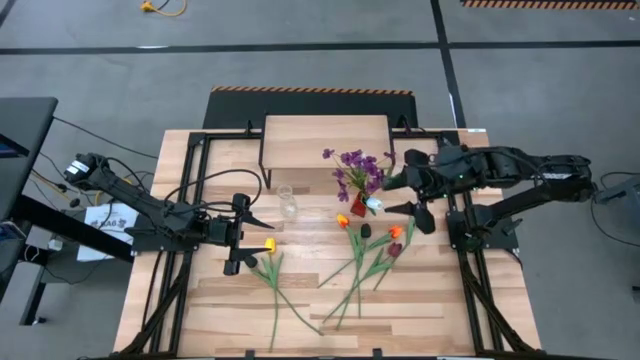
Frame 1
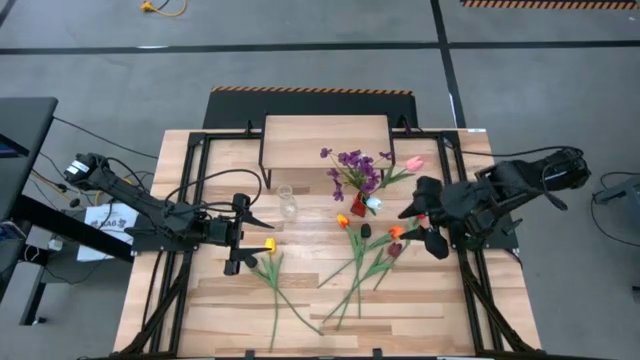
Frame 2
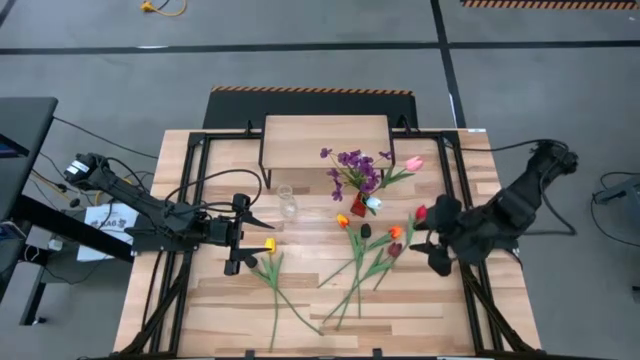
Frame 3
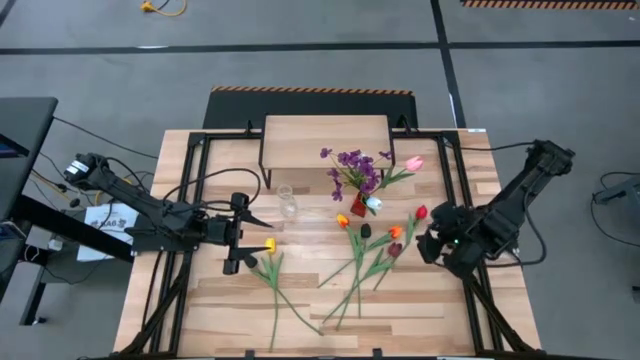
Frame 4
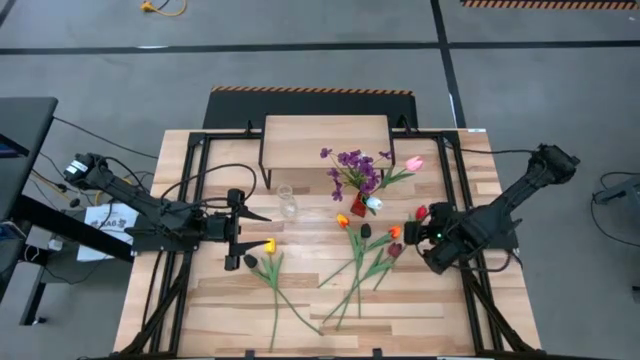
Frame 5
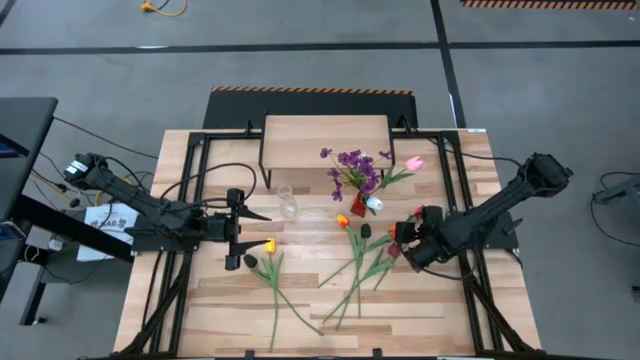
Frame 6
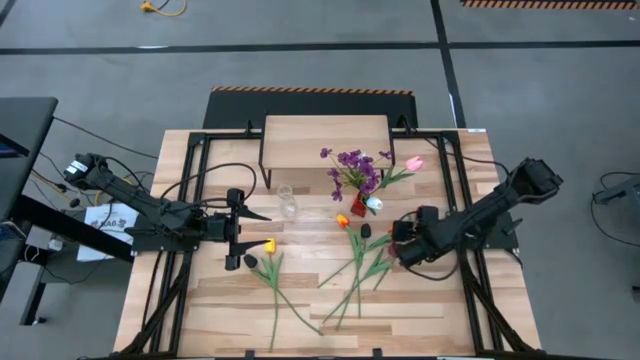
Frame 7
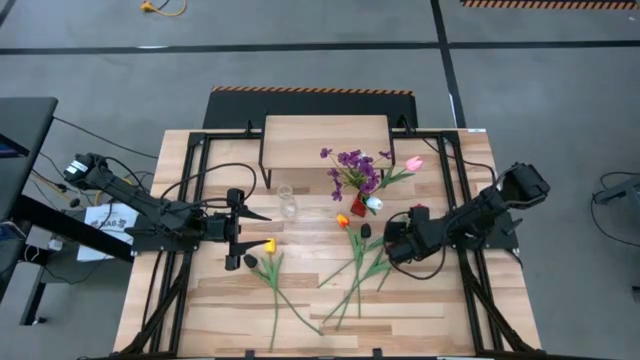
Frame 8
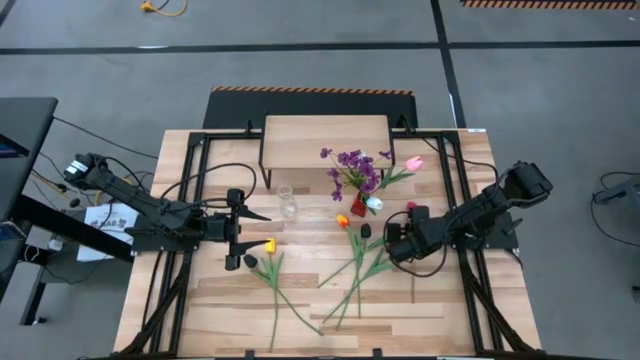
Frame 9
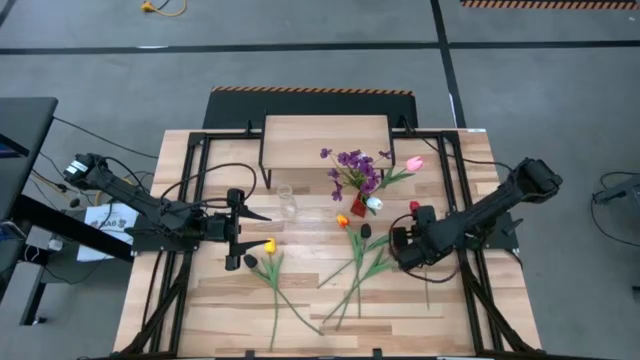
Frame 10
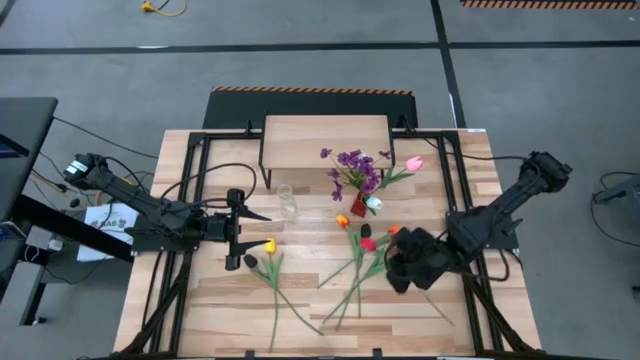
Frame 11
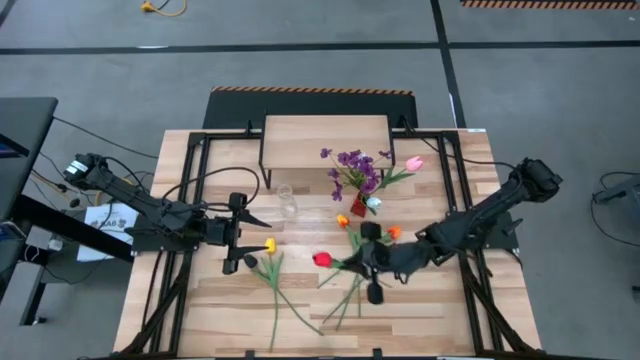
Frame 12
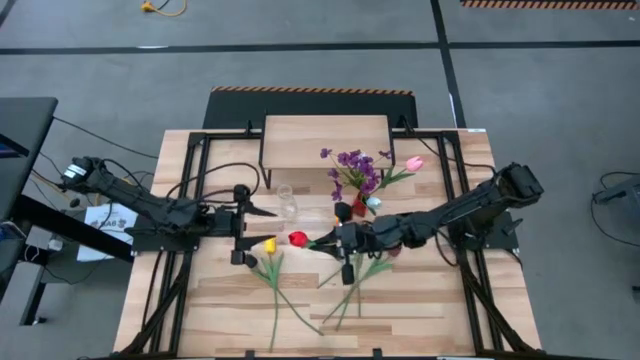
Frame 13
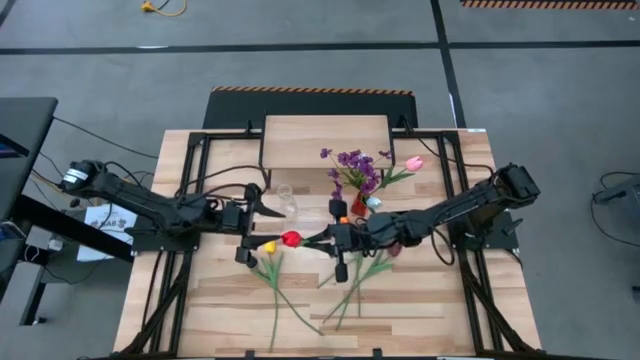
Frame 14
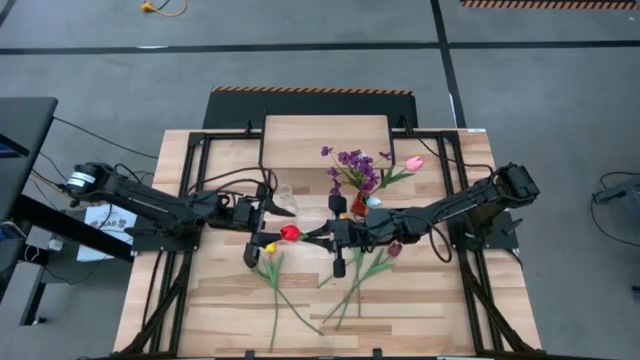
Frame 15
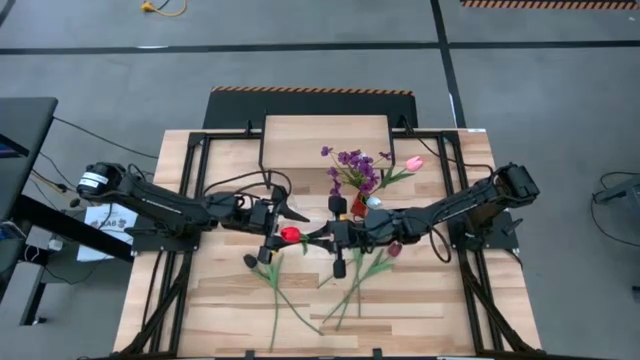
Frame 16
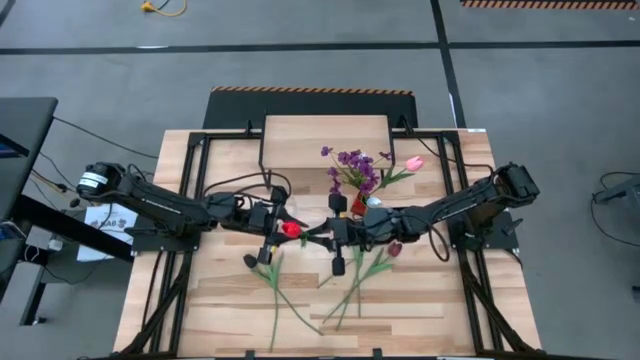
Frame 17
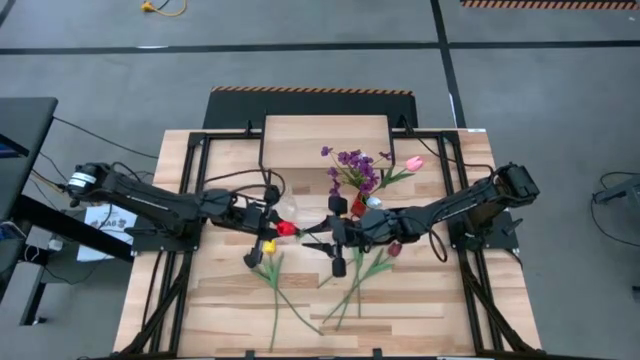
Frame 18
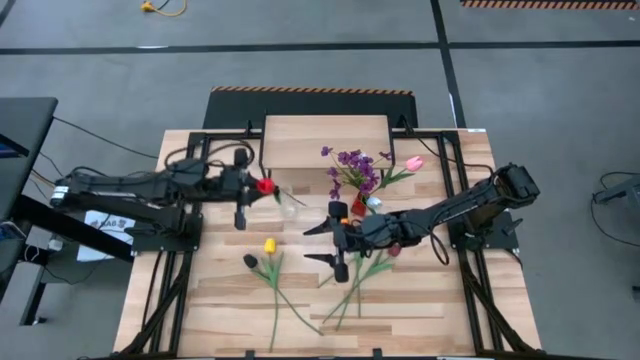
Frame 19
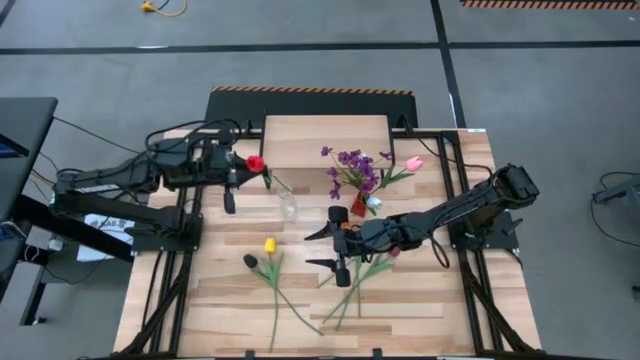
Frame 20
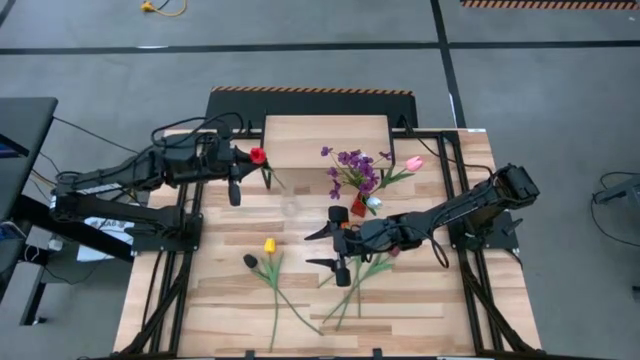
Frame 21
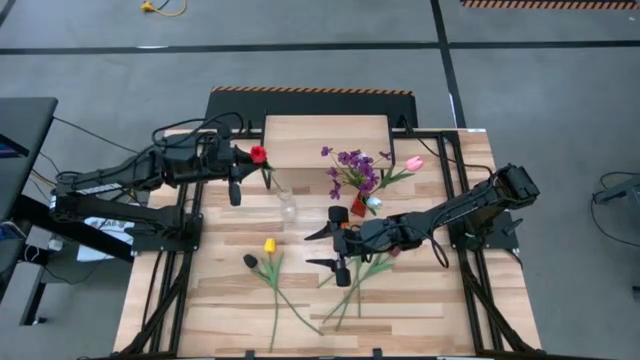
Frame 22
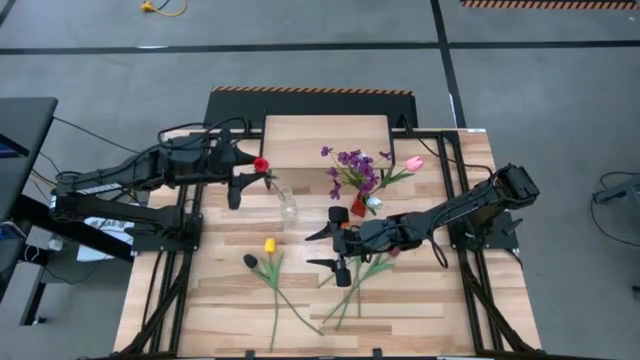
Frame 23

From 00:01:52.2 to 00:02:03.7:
Task: Pick and place flowers into a vace then onto a shelf
Put the red flower into the transparent flower vase

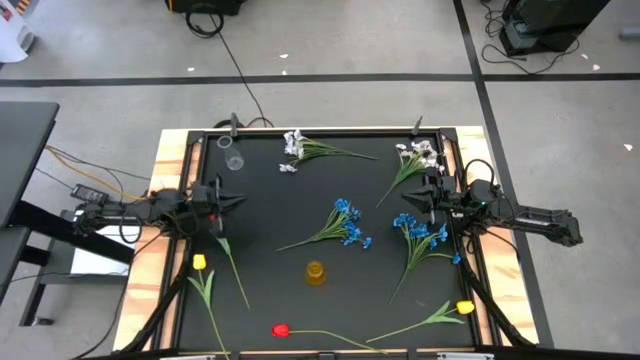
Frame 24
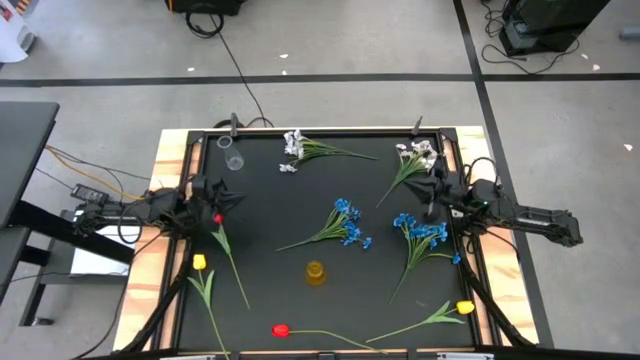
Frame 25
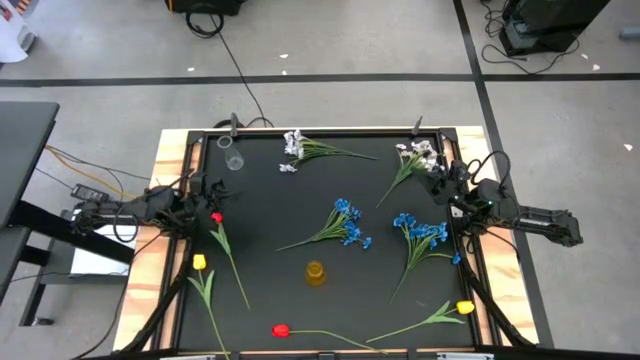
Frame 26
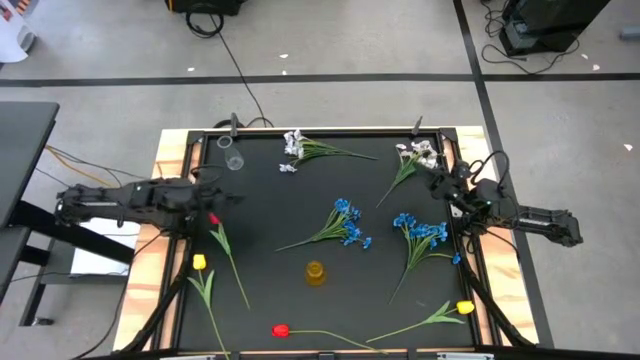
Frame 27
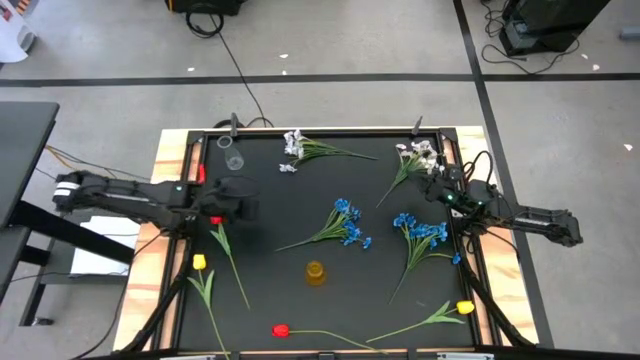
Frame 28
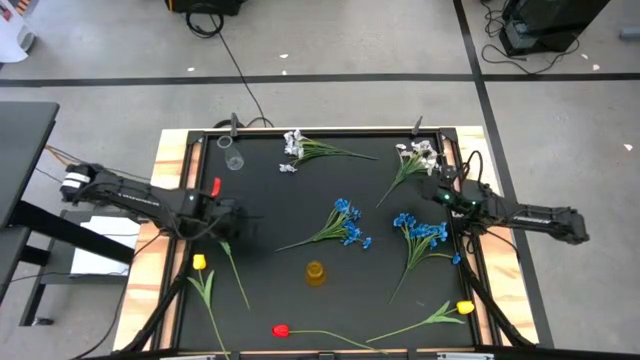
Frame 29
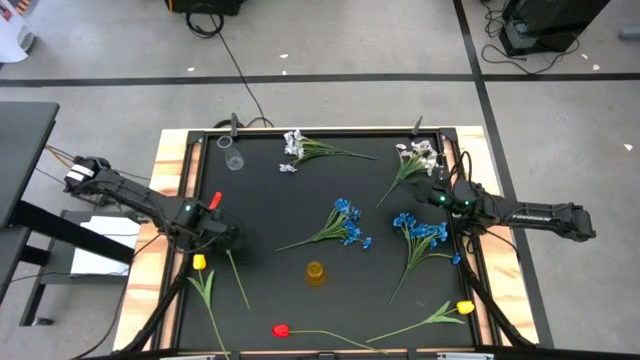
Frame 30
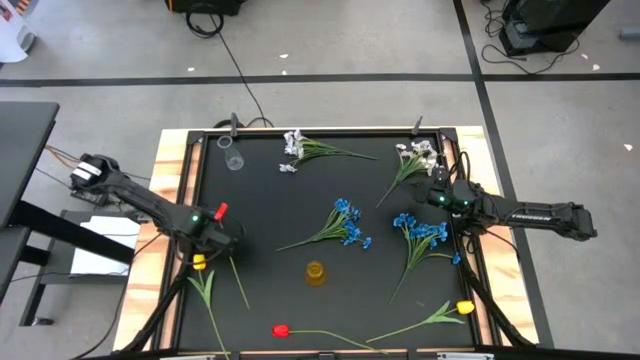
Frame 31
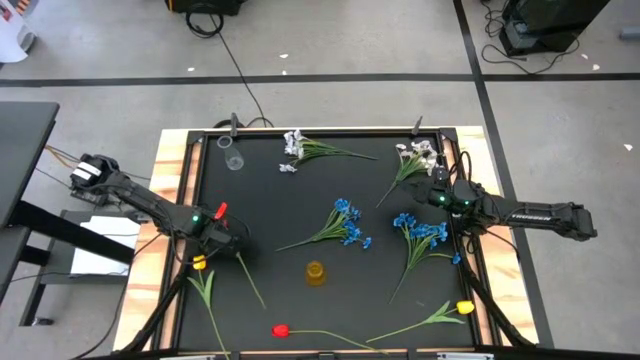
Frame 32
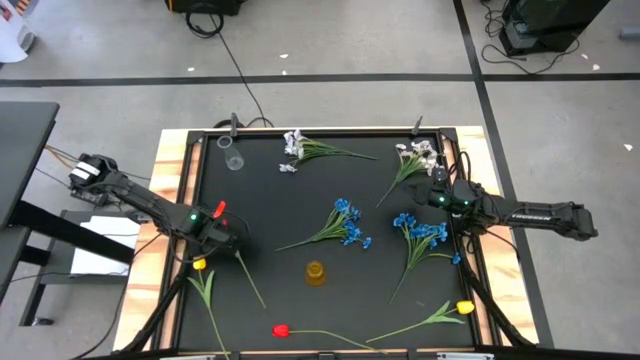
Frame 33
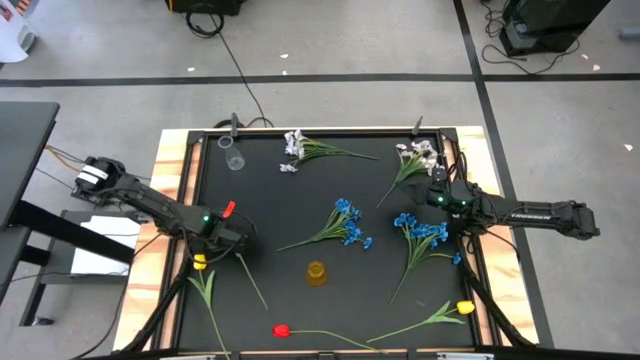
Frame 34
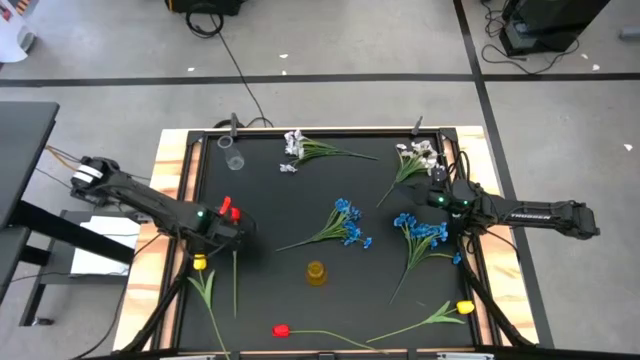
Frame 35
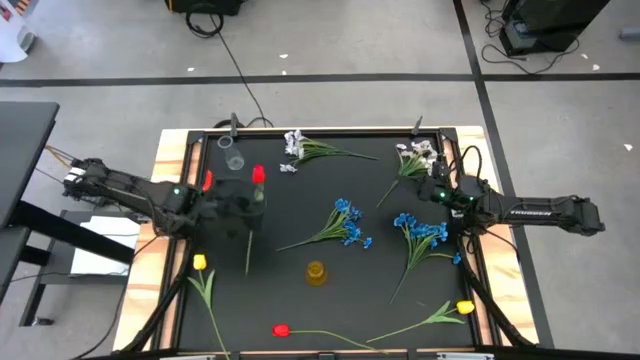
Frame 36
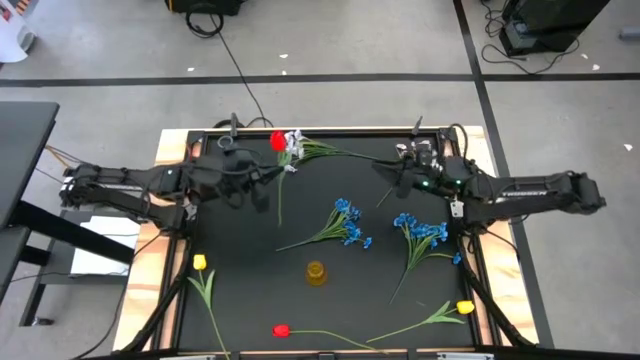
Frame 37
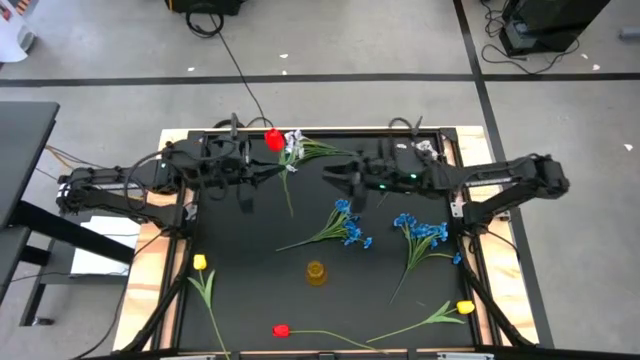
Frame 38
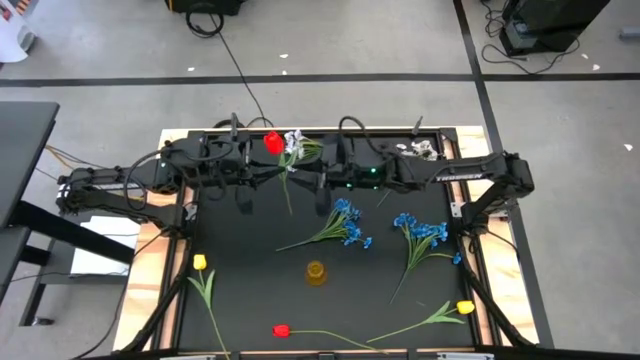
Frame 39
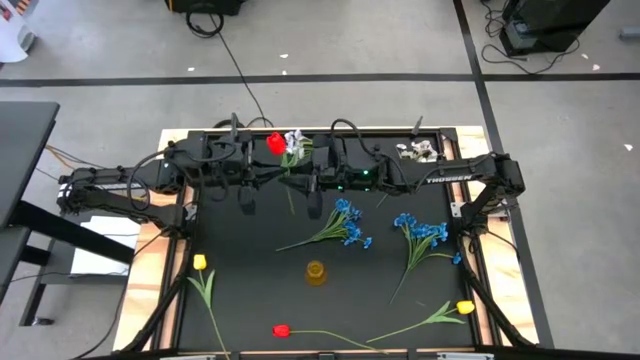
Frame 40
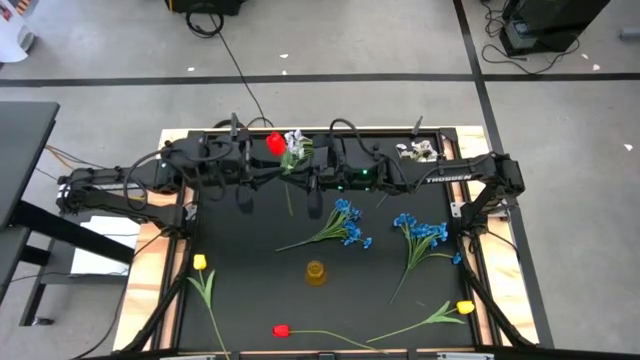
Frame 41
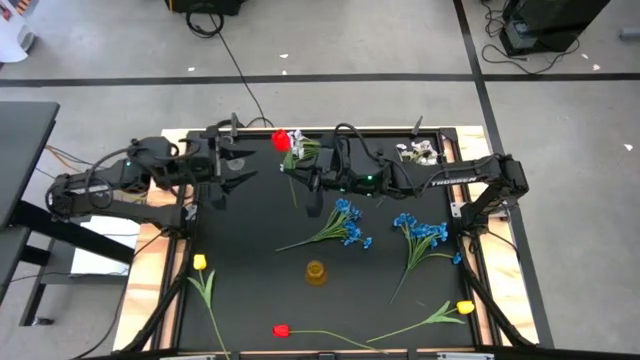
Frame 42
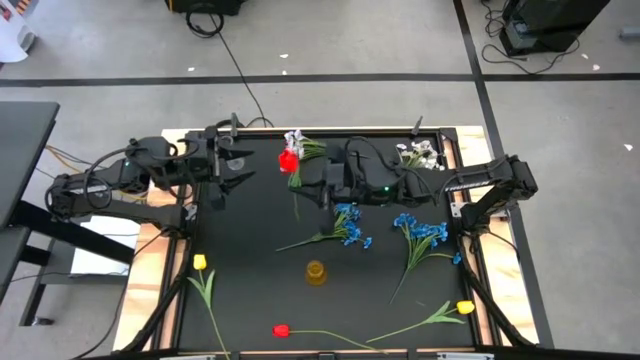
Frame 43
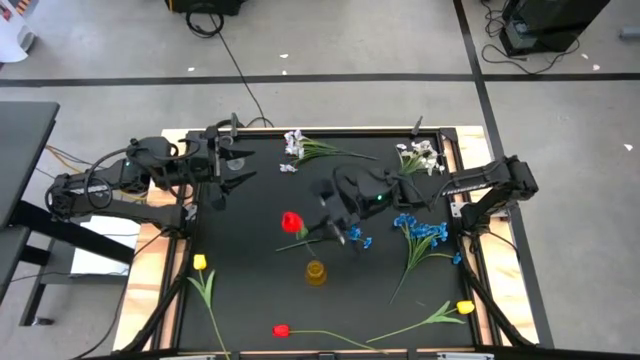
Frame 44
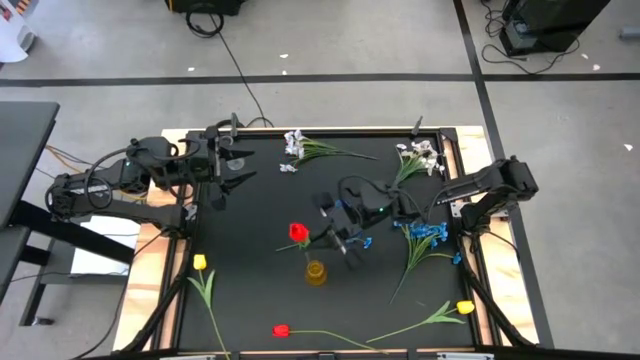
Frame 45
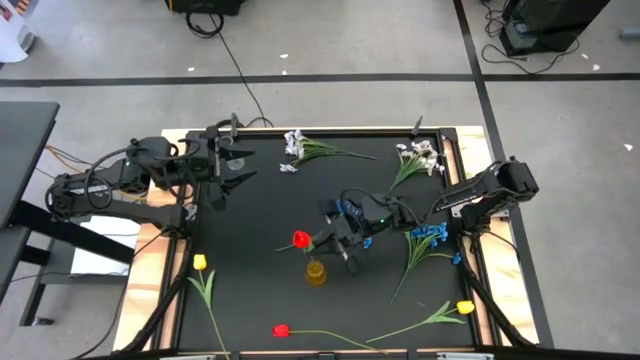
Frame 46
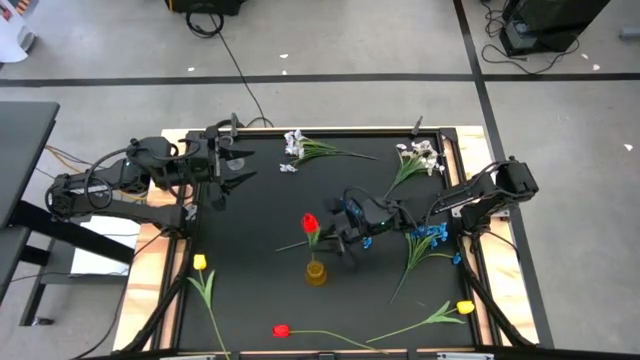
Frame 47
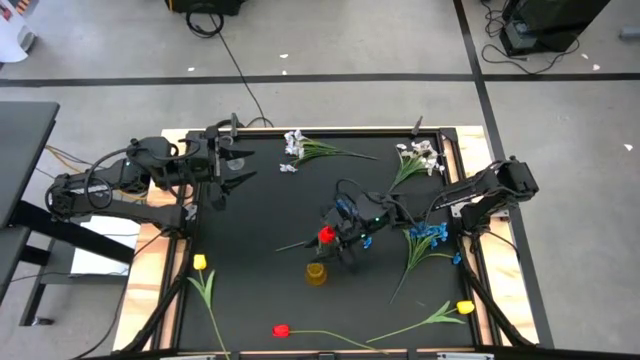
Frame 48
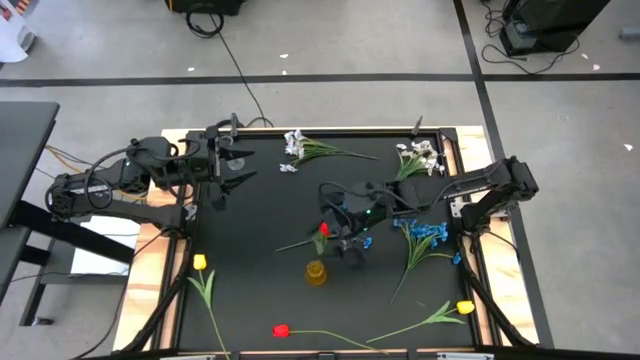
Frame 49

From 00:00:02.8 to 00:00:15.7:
Task: Sort flowers into vase by color
Put the top red flower into the yellow vase
